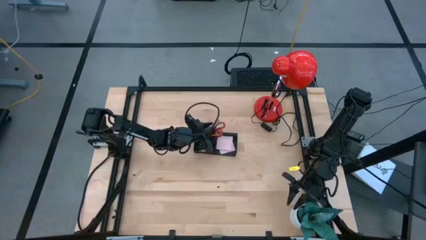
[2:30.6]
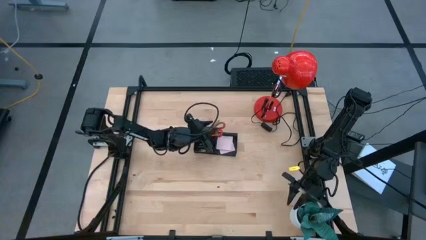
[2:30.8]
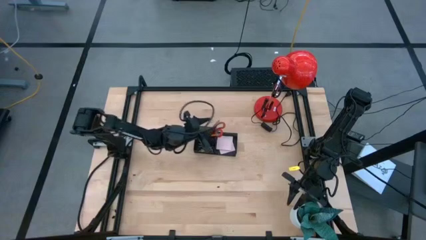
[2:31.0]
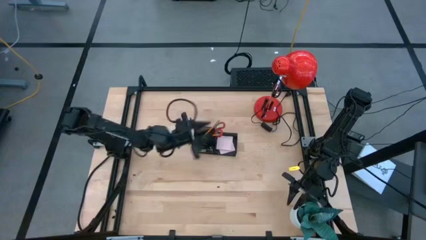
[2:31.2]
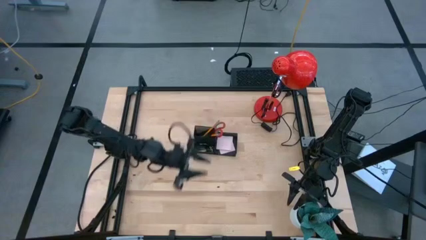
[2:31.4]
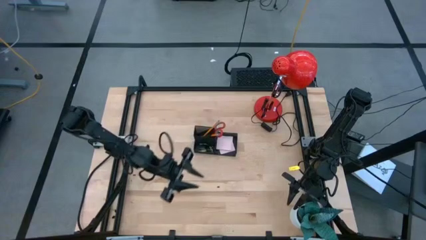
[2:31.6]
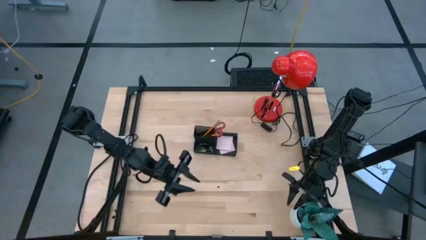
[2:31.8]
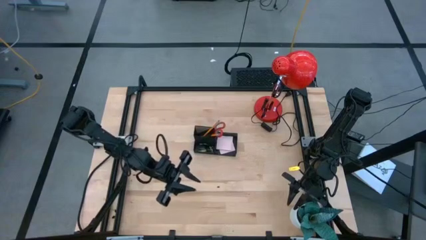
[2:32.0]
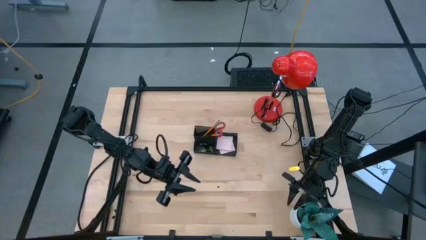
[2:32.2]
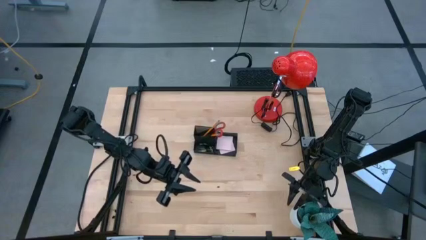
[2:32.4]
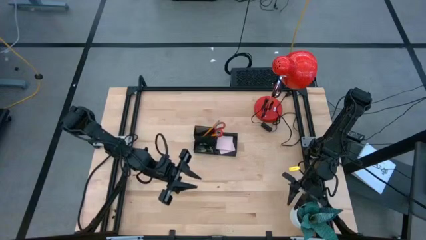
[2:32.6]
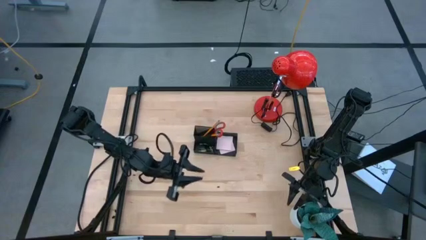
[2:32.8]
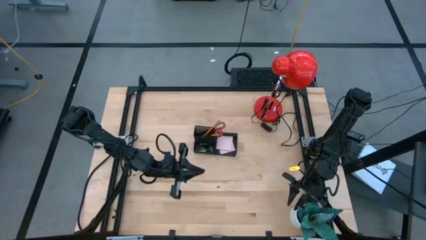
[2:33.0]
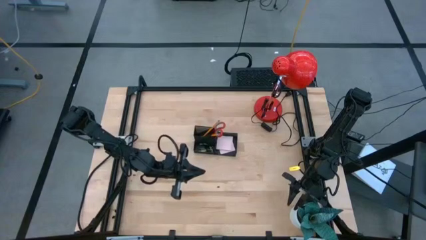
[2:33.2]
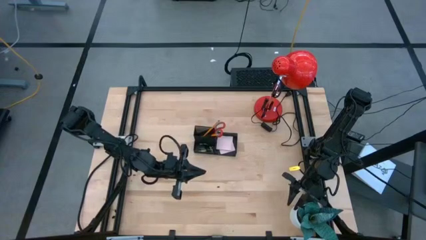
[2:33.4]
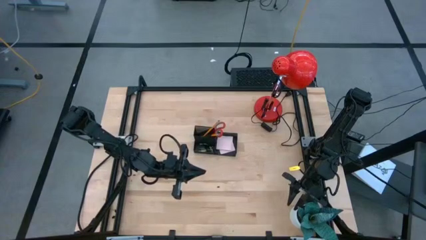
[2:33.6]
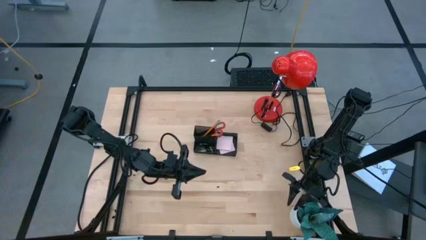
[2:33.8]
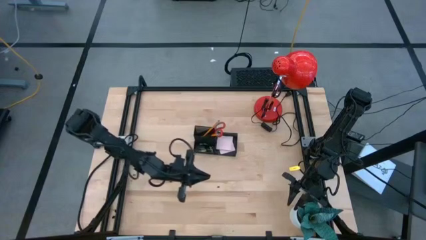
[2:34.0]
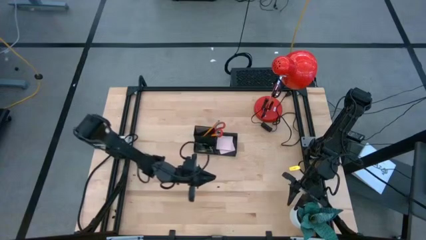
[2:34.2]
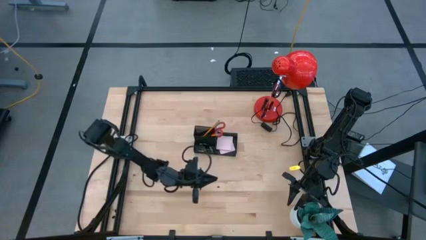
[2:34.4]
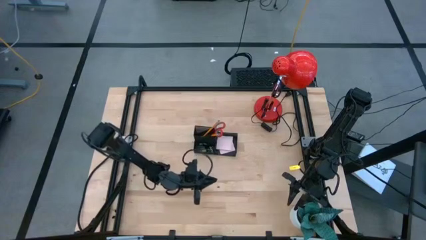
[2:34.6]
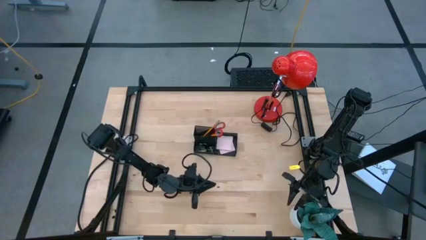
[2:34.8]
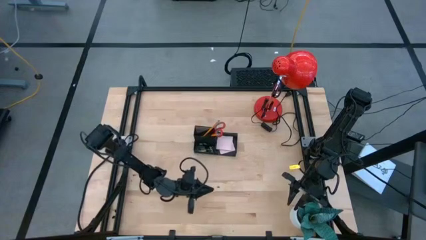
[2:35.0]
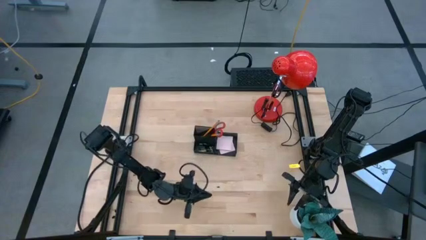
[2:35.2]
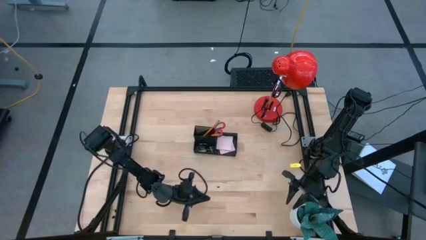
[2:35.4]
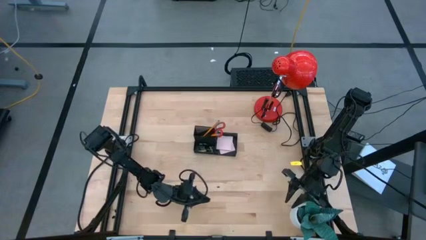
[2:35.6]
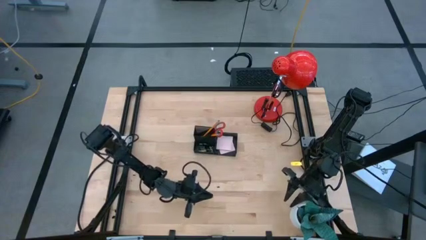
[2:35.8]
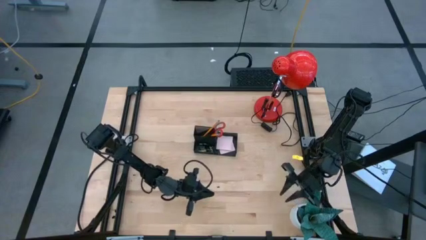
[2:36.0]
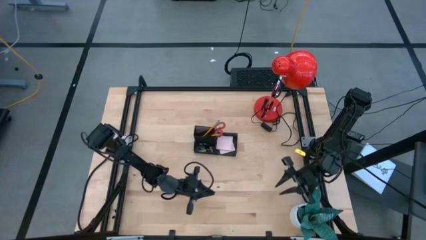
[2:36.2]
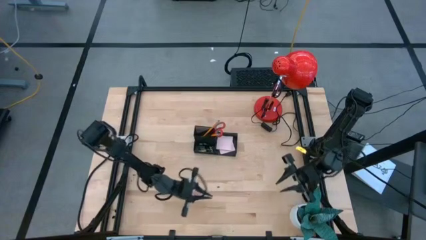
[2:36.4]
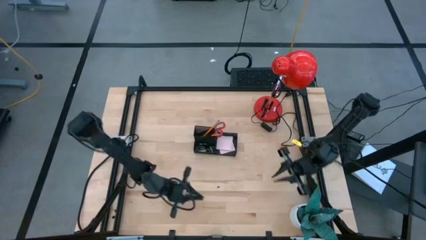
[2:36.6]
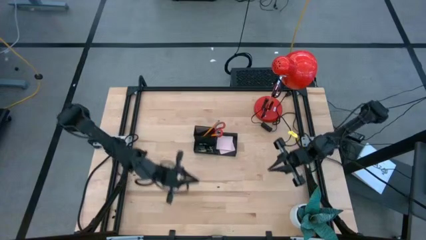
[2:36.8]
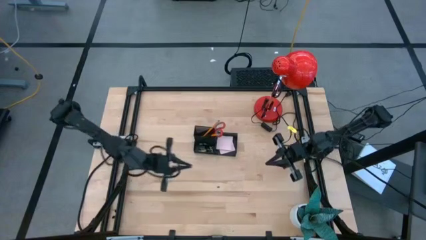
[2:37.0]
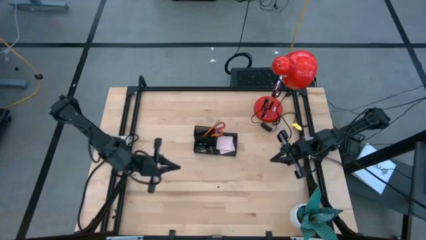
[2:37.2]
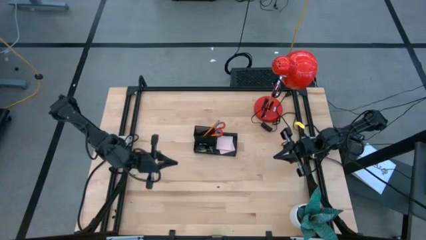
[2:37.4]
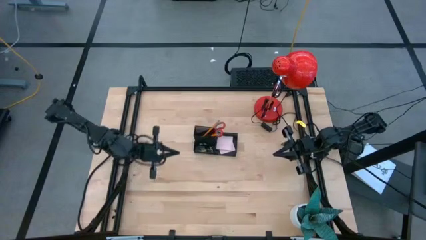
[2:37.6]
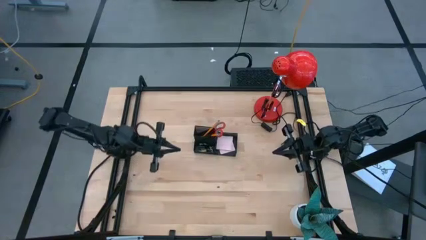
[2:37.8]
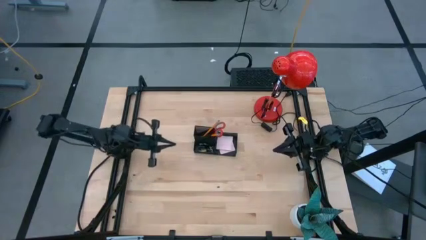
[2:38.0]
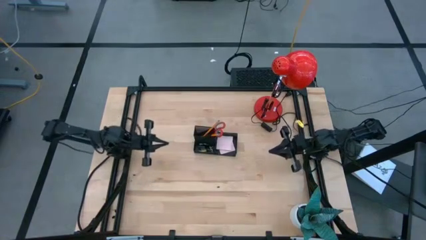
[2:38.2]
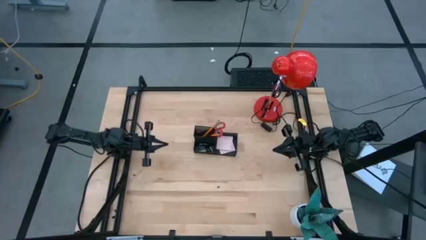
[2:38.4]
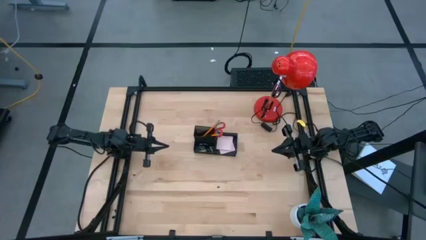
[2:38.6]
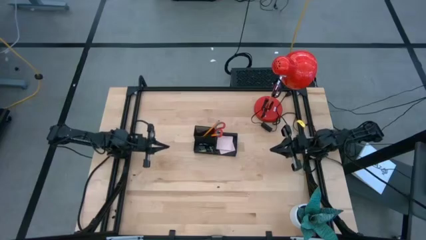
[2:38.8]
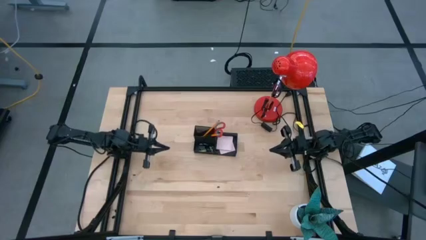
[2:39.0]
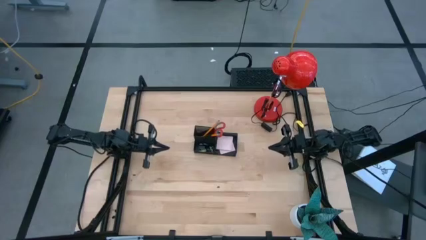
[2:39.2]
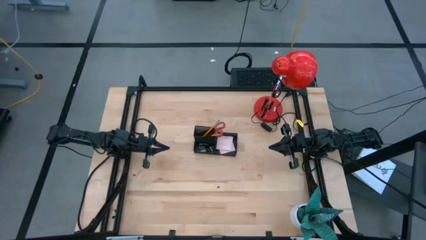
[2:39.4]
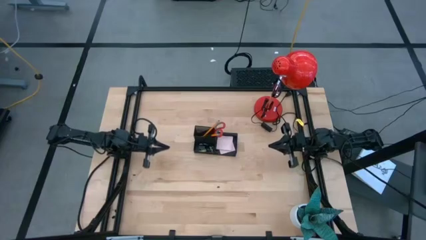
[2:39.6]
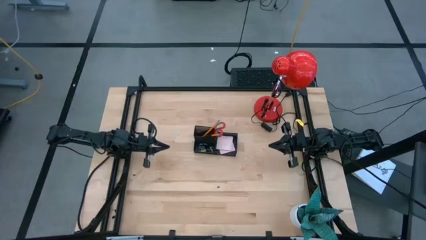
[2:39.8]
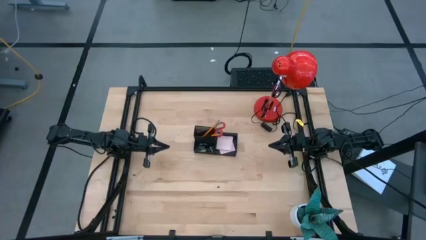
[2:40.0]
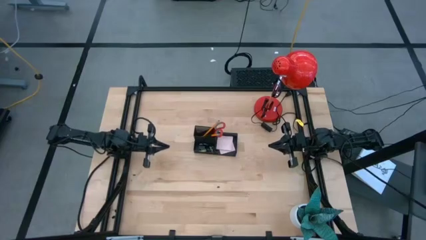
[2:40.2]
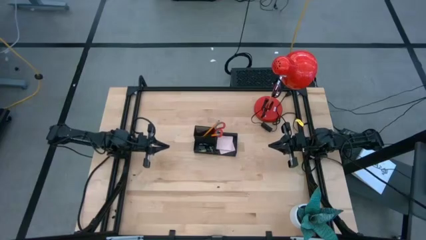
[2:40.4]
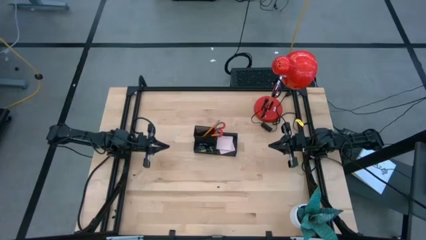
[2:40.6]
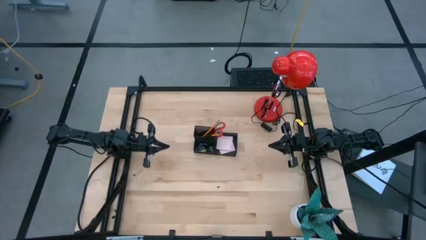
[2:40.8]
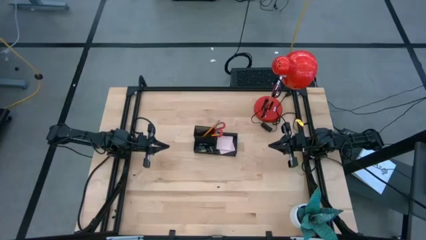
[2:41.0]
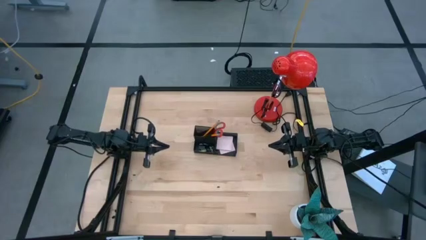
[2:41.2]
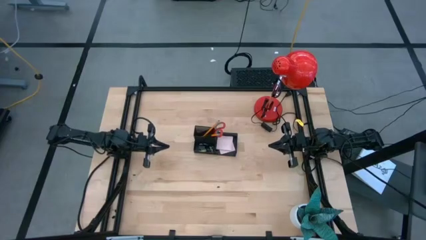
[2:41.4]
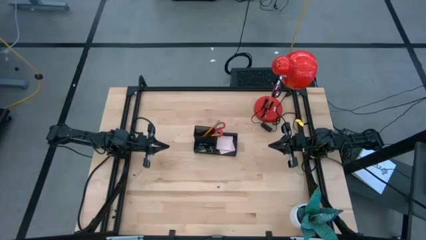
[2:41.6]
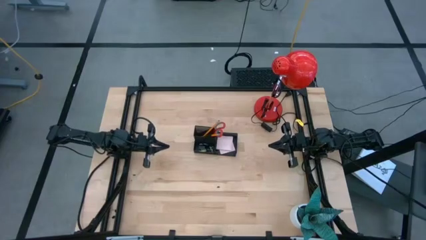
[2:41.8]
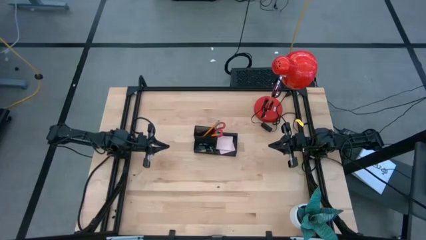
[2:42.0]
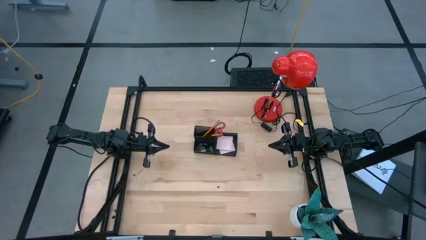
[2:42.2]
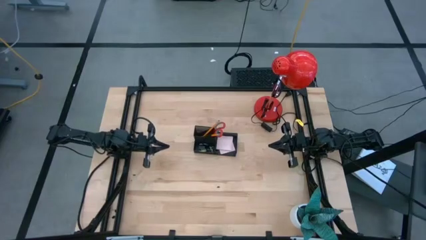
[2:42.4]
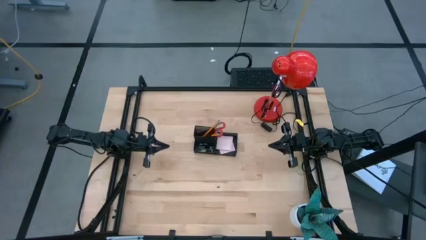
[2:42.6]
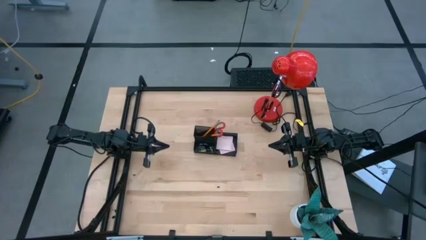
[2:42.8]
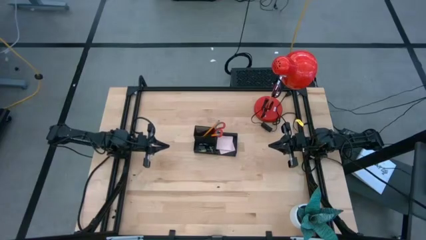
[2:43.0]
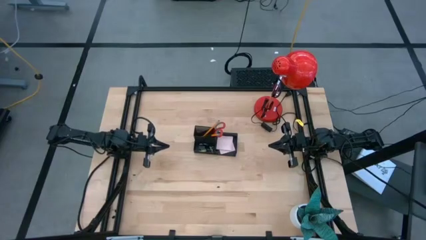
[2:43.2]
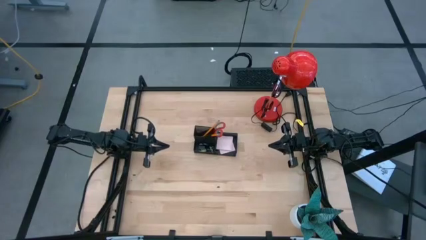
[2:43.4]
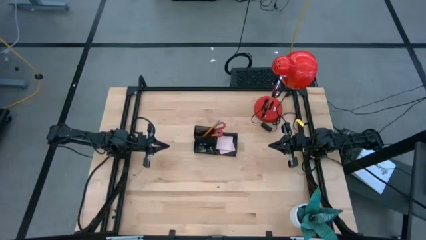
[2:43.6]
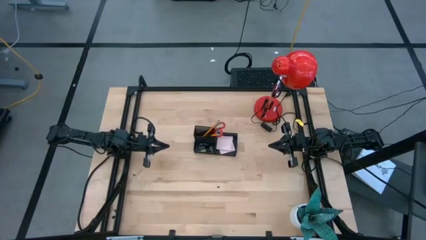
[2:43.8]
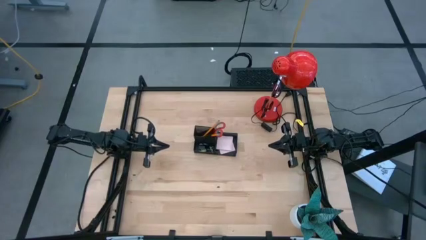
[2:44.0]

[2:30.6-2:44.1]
Task: Pick and place office supplies into organizer
Return to Home Position
